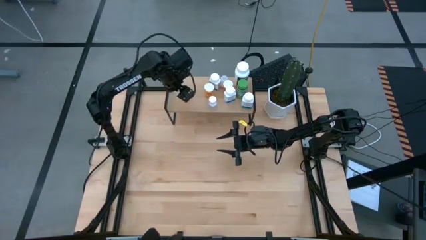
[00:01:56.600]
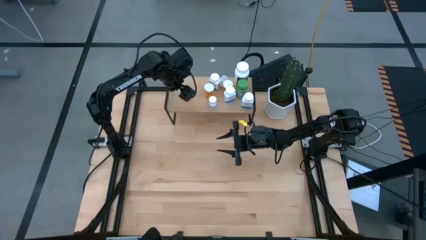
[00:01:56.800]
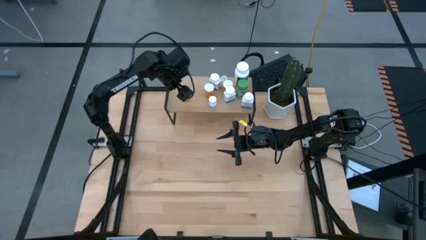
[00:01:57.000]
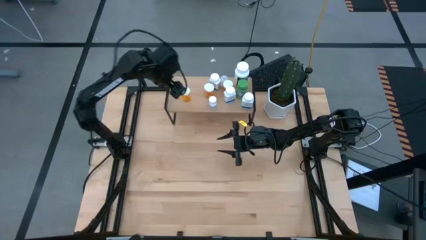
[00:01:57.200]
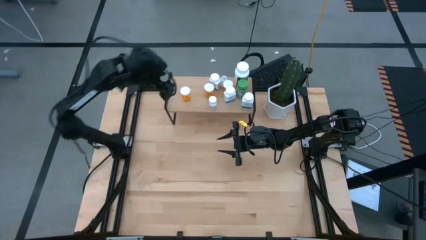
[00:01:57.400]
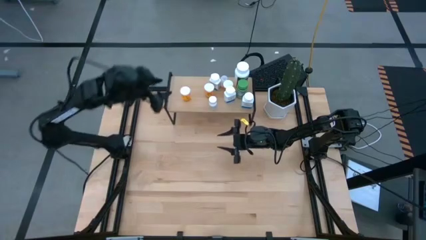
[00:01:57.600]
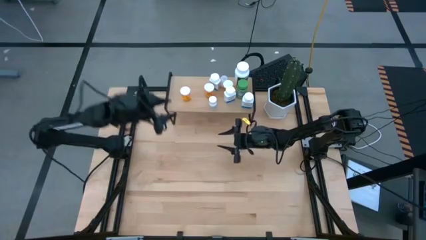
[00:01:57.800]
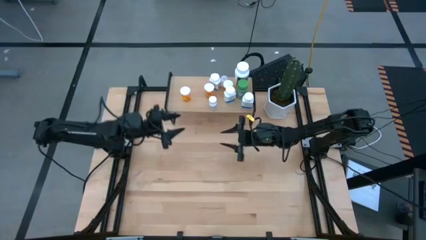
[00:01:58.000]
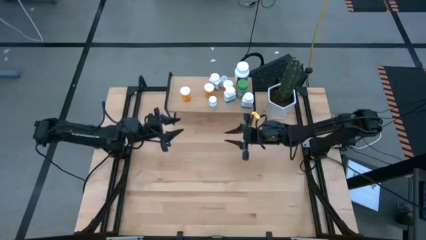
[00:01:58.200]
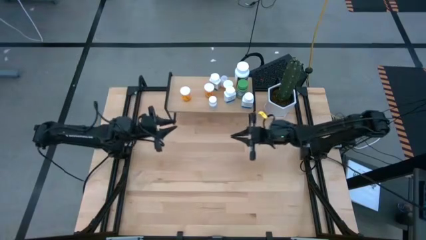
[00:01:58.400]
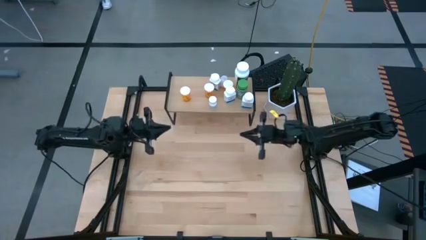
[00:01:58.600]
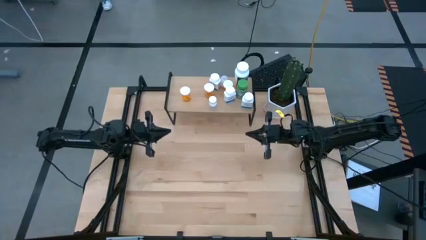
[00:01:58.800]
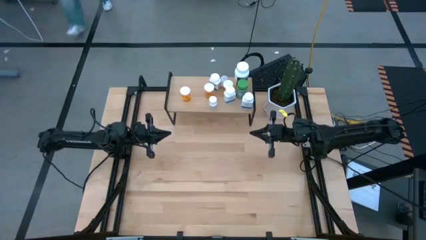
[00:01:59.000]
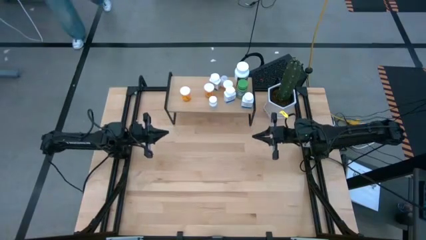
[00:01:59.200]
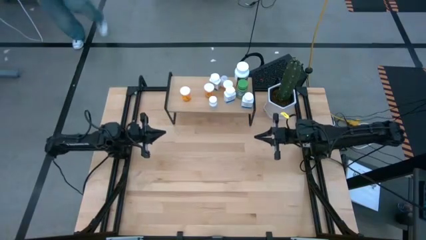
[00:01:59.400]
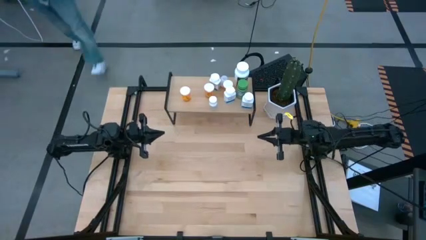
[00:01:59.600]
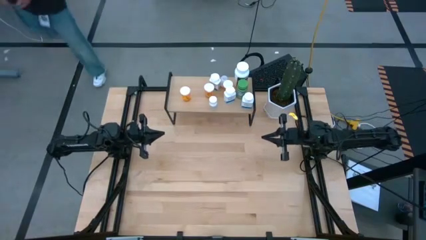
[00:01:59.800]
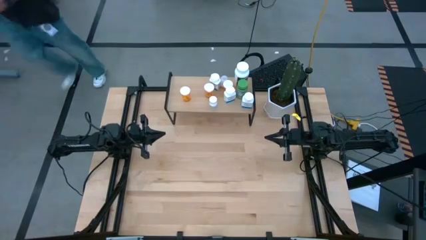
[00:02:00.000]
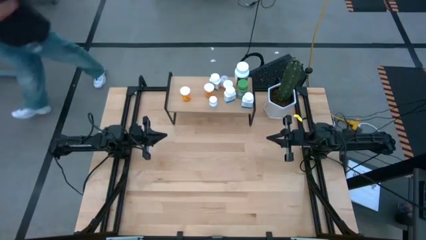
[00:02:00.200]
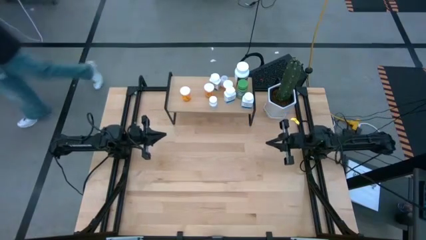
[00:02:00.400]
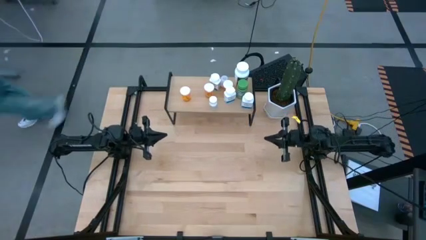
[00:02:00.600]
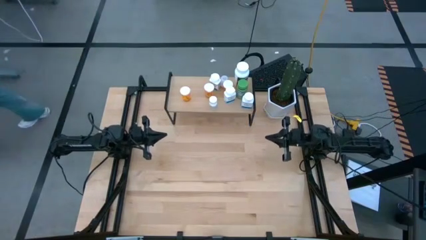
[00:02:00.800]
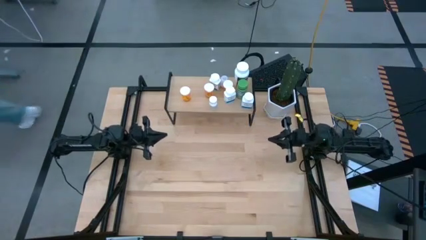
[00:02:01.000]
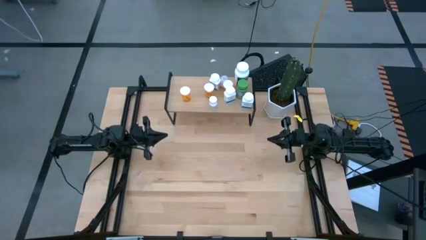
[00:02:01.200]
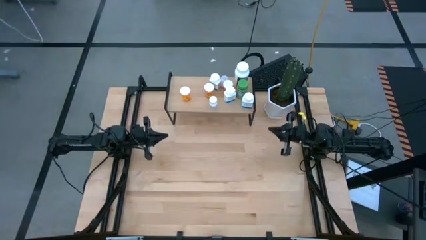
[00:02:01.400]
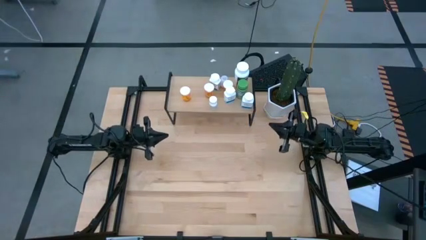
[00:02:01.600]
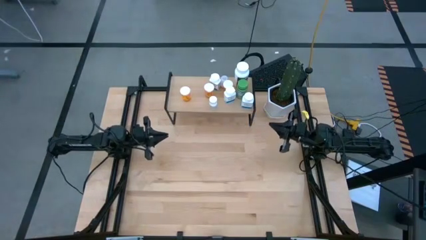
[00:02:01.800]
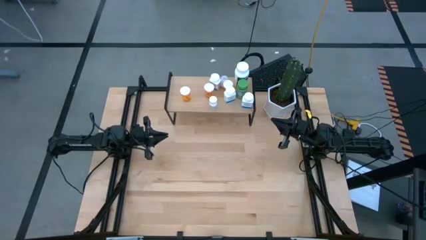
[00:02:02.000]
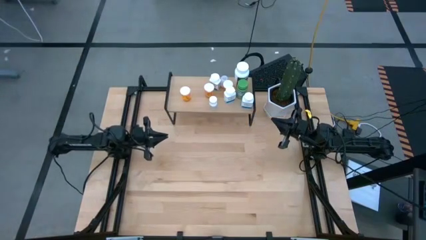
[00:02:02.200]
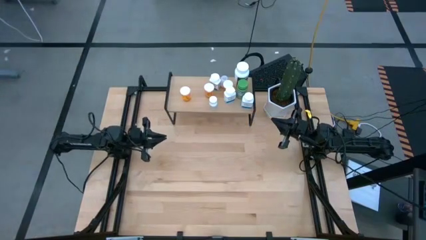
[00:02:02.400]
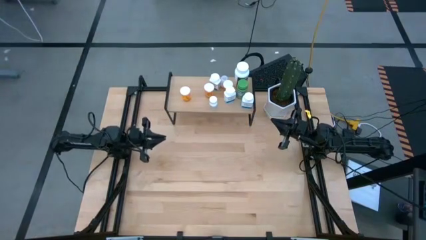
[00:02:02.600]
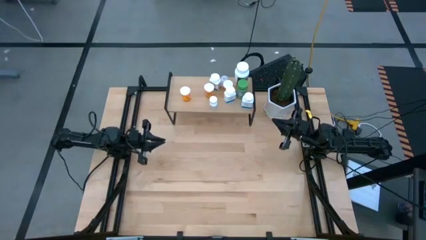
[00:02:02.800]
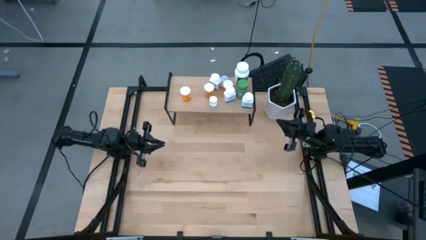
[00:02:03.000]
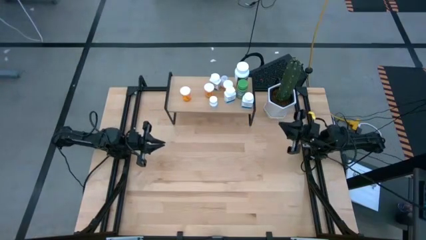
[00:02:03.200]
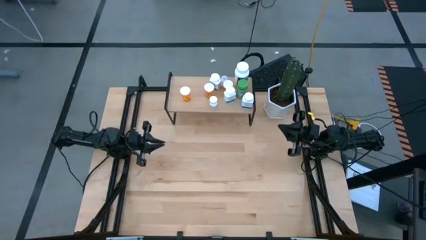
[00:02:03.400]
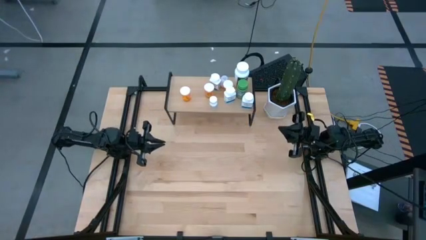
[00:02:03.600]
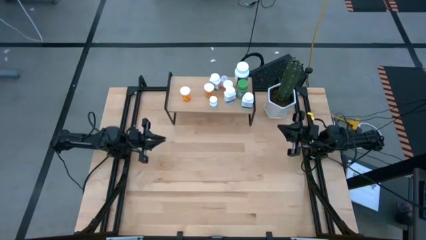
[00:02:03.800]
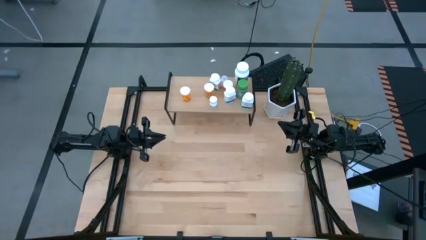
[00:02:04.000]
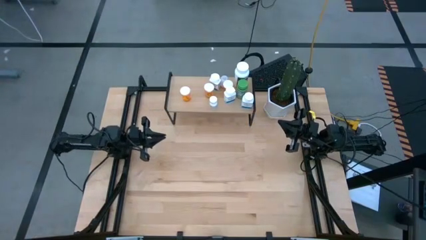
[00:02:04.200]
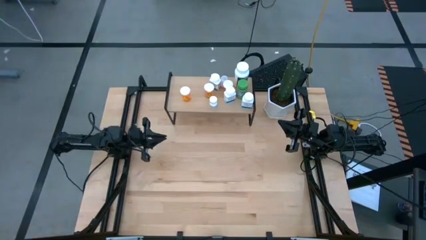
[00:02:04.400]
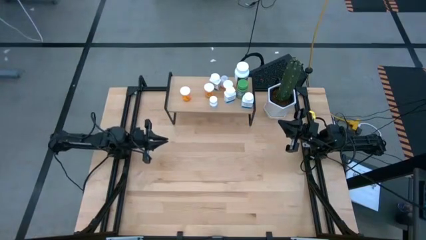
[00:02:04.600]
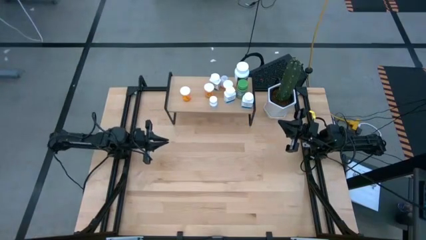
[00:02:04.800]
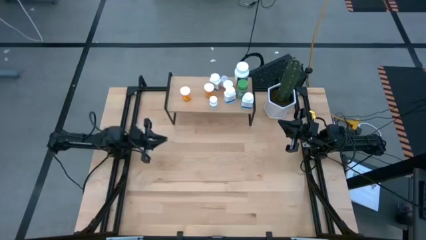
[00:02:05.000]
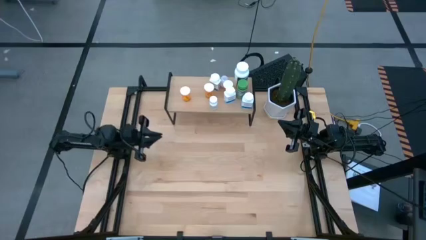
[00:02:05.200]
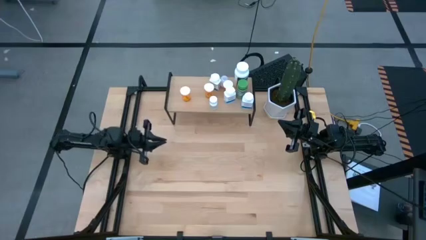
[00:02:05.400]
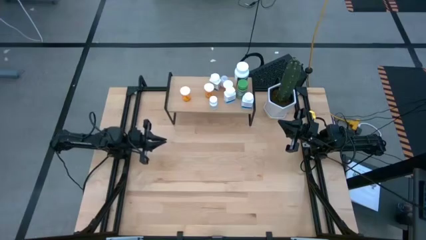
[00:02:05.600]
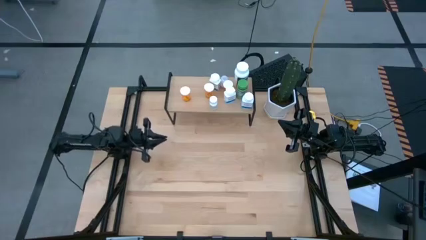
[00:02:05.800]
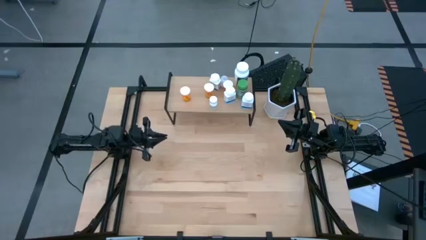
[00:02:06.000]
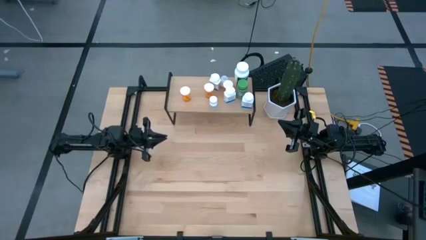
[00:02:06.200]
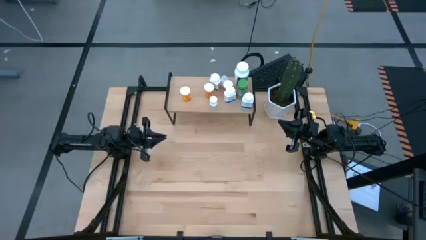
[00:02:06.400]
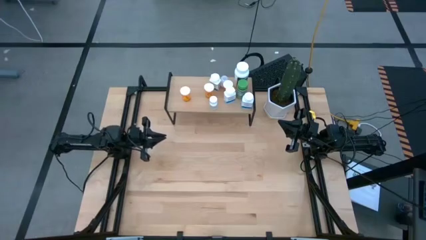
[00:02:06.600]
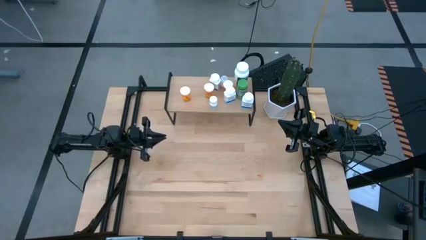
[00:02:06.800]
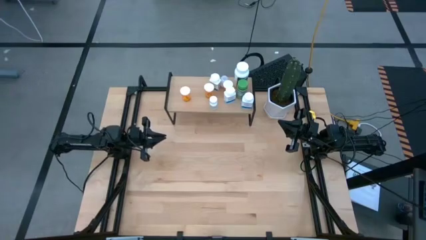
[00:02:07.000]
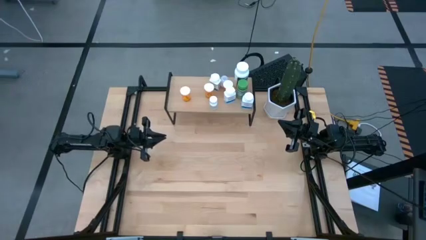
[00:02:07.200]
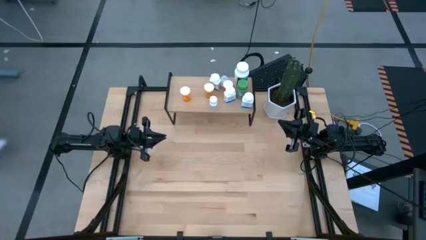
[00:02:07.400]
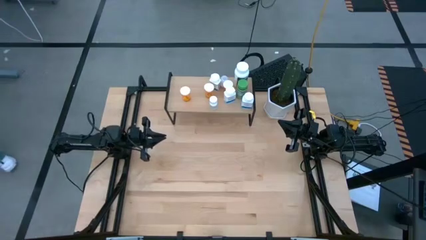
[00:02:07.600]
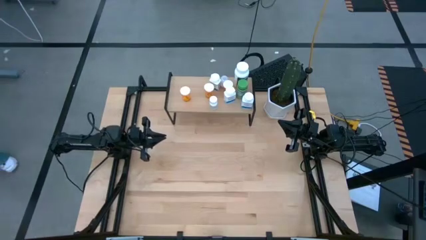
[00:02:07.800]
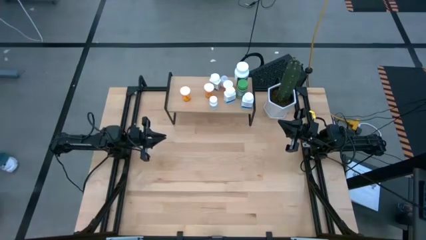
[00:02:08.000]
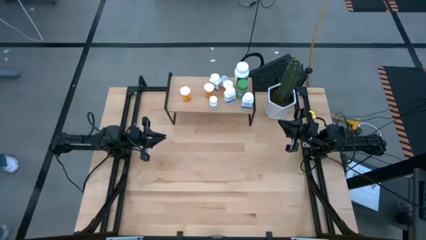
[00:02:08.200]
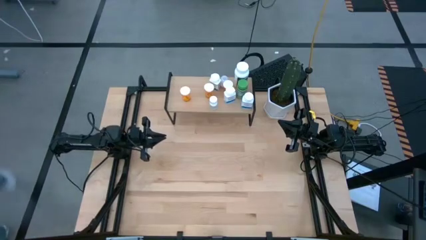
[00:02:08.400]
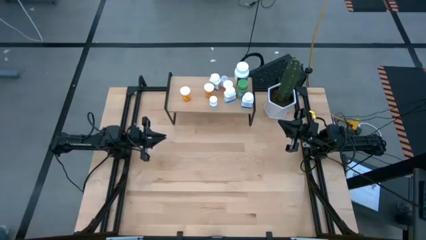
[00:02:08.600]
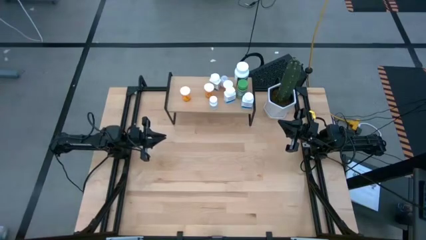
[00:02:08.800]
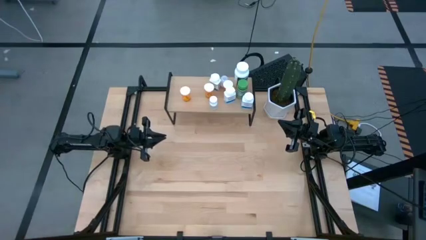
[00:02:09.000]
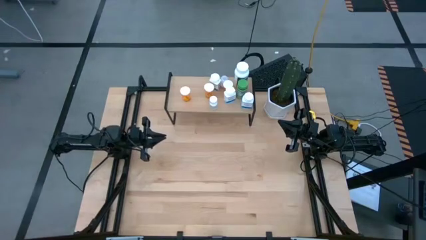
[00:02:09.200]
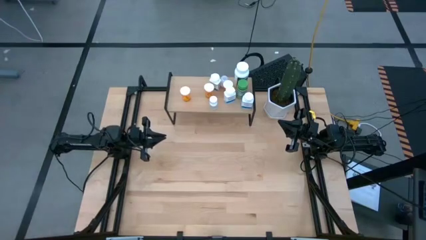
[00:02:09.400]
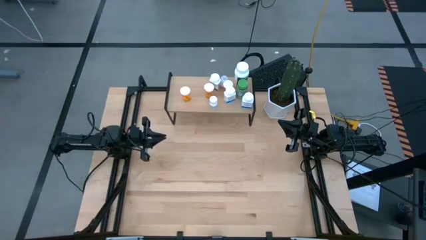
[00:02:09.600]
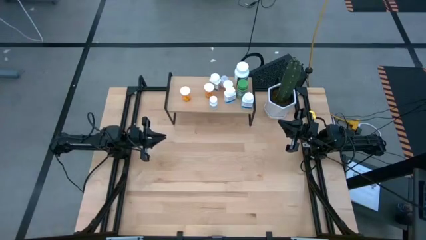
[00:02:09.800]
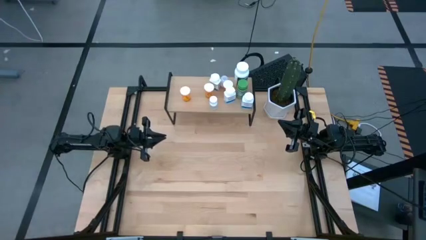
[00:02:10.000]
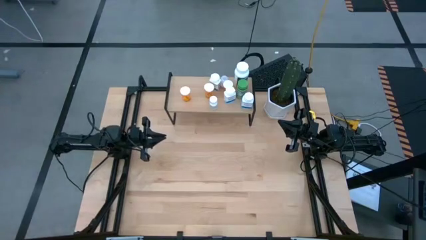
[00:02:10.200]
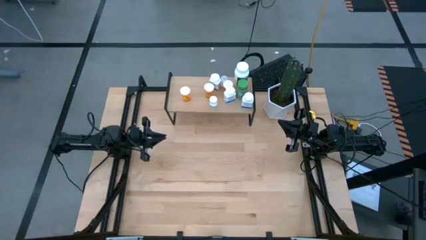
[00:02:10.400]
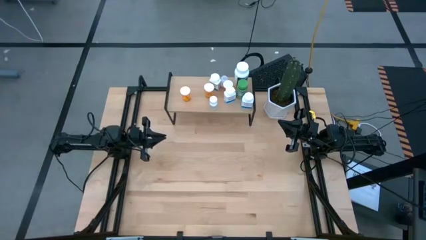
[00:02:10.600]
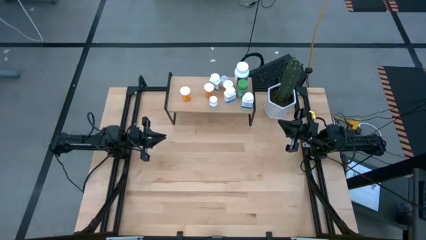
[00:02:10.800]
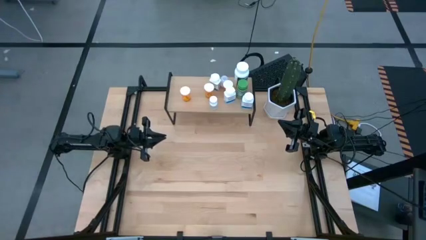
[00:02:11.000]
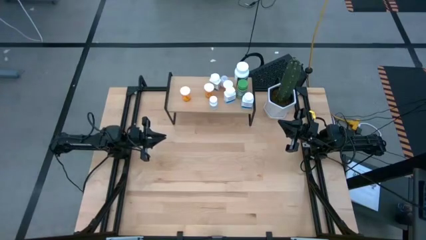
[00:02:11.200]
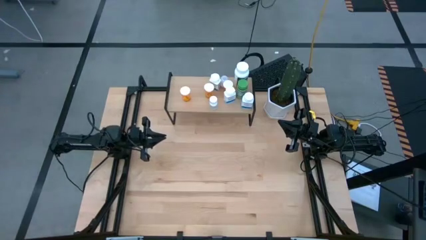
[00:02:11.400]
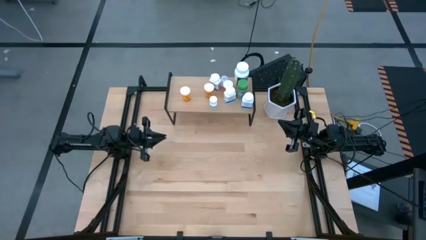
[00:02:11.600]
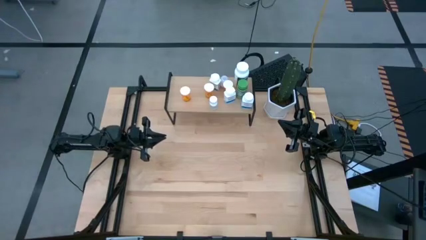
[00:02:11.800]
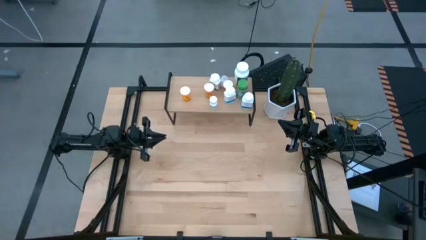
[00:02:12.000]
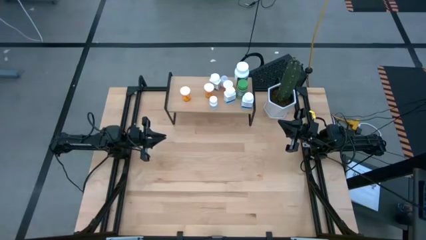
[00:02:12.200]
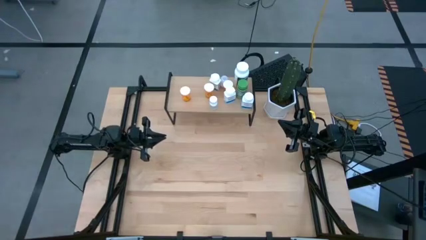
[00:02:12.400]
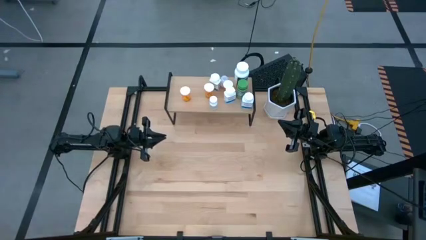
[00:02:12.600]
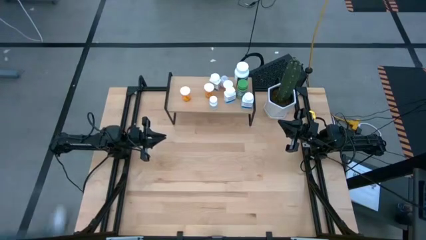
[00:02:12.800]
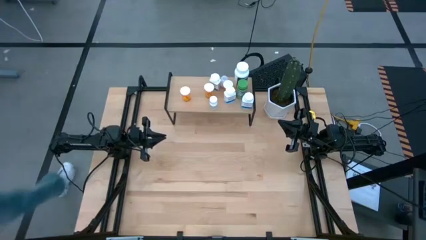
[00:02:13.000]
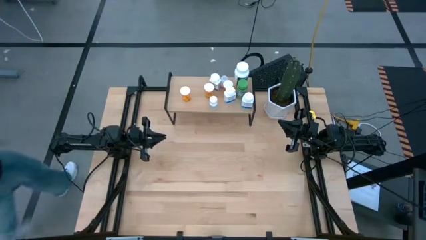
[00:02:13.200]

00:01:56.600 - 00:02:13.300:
Task: Pick and place medicine bottles onto shelf by color
Return to Home Position
